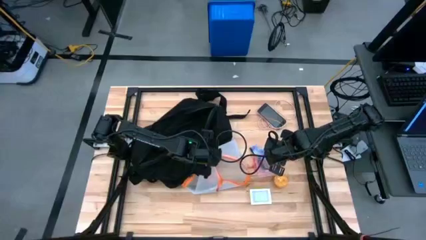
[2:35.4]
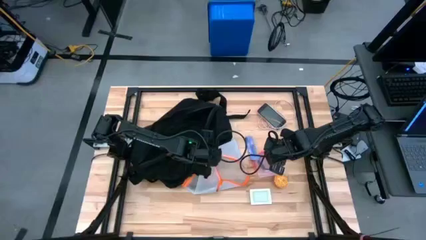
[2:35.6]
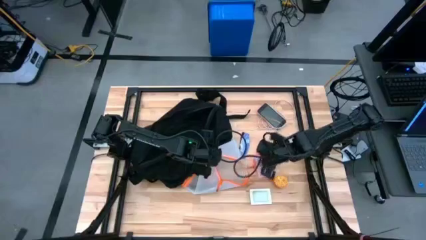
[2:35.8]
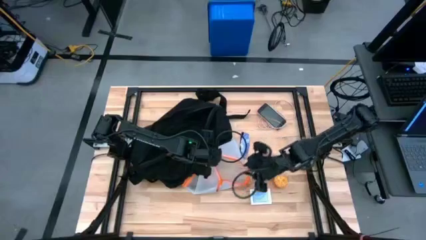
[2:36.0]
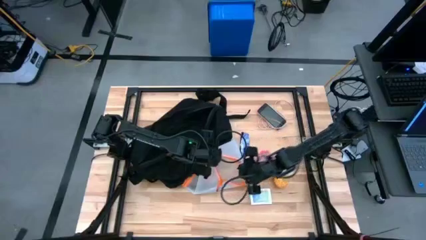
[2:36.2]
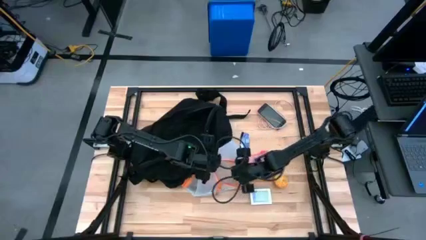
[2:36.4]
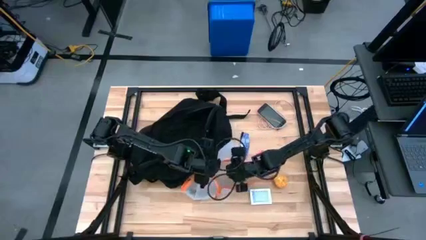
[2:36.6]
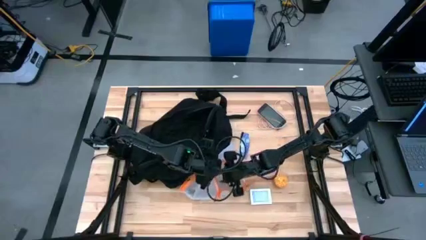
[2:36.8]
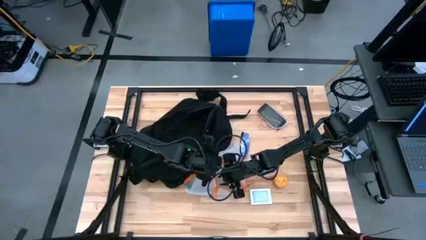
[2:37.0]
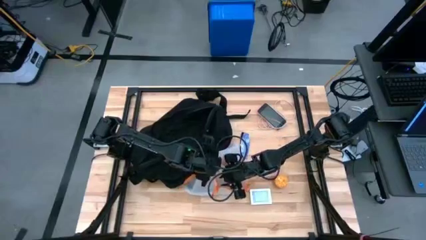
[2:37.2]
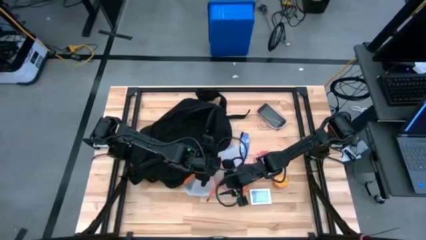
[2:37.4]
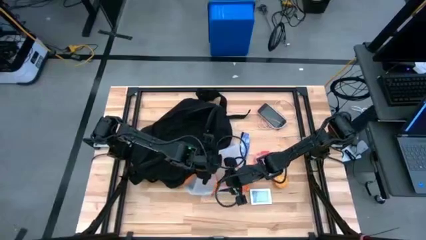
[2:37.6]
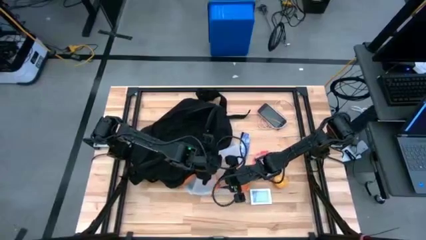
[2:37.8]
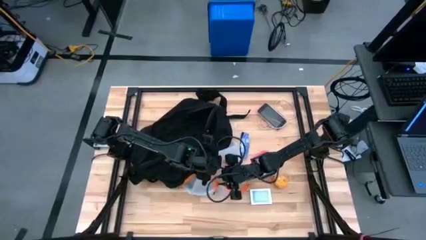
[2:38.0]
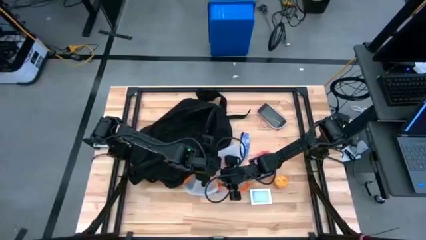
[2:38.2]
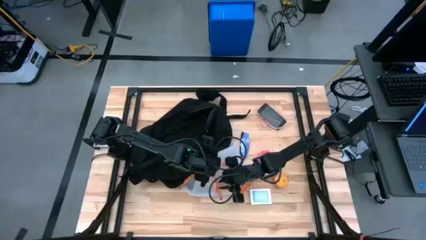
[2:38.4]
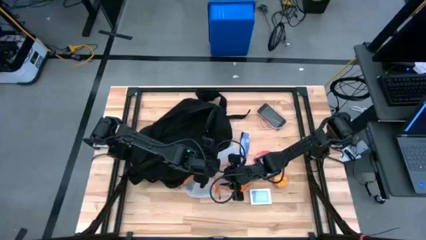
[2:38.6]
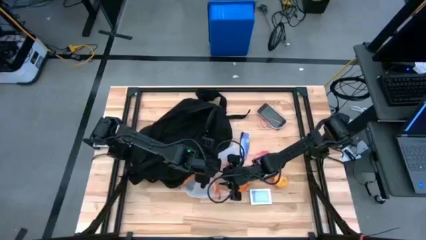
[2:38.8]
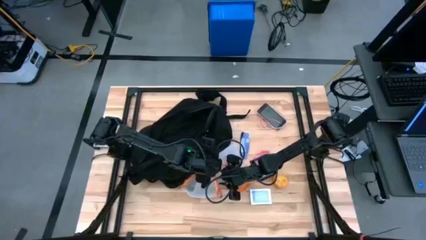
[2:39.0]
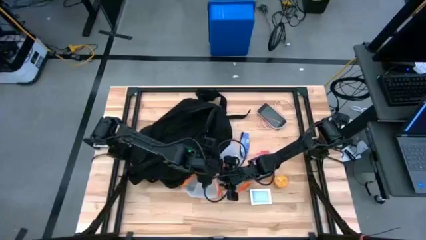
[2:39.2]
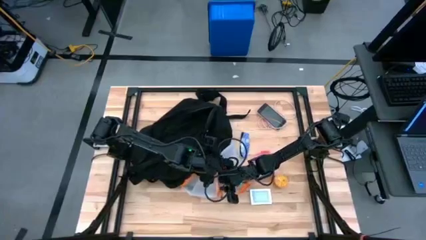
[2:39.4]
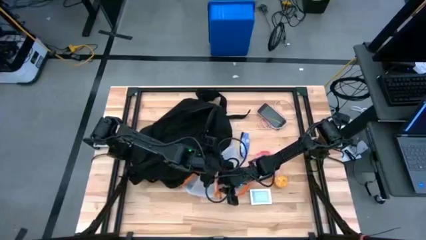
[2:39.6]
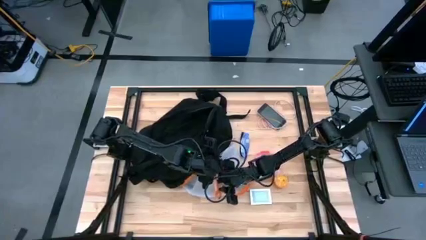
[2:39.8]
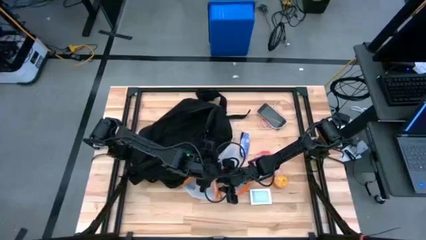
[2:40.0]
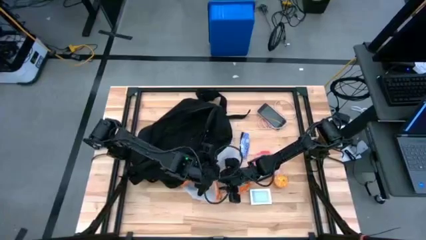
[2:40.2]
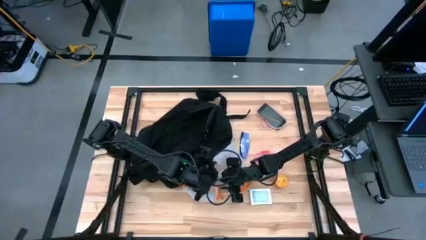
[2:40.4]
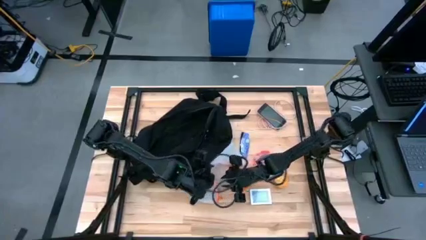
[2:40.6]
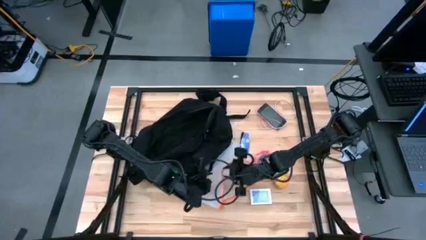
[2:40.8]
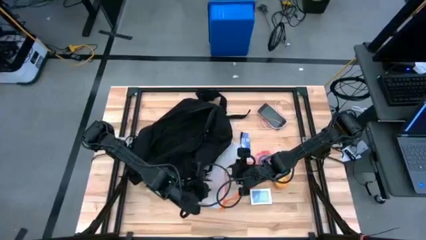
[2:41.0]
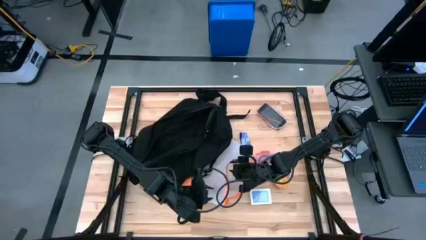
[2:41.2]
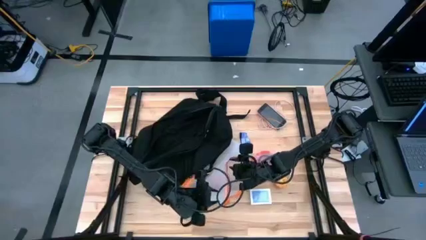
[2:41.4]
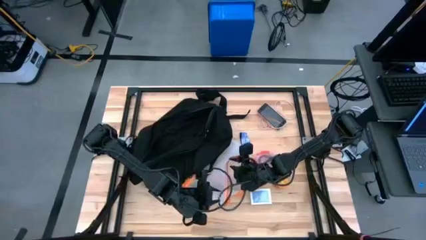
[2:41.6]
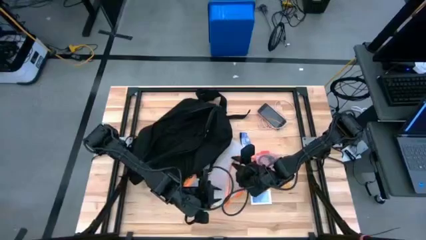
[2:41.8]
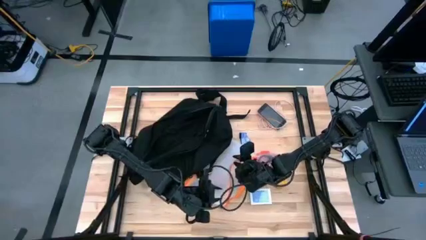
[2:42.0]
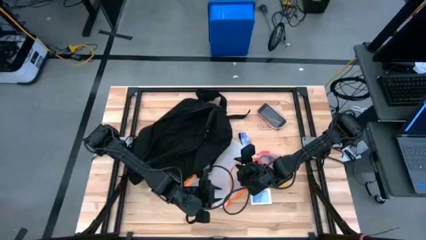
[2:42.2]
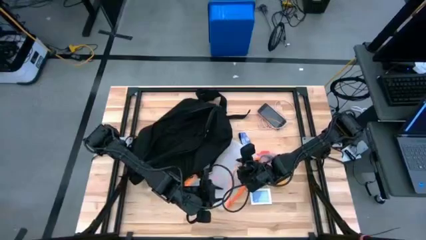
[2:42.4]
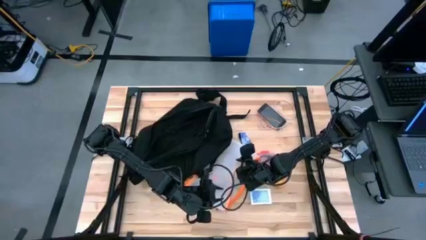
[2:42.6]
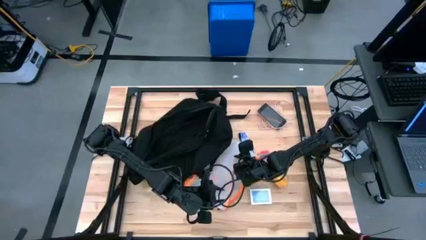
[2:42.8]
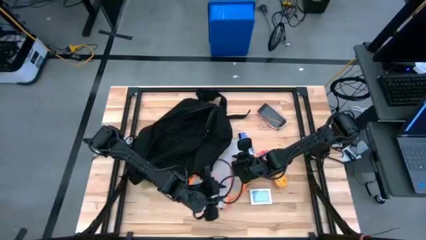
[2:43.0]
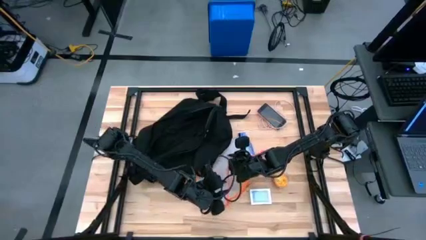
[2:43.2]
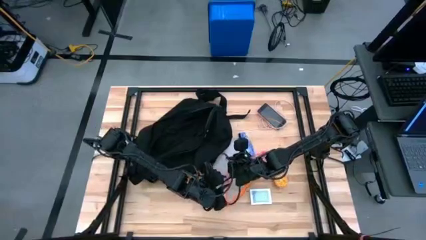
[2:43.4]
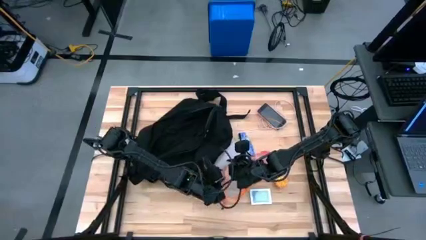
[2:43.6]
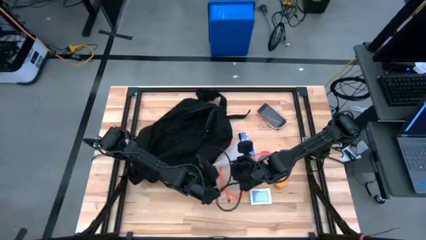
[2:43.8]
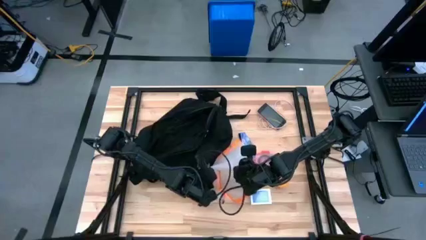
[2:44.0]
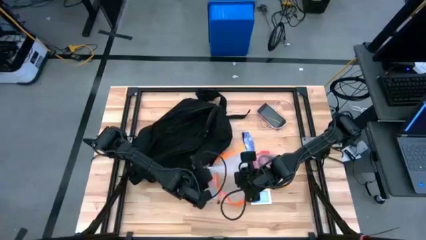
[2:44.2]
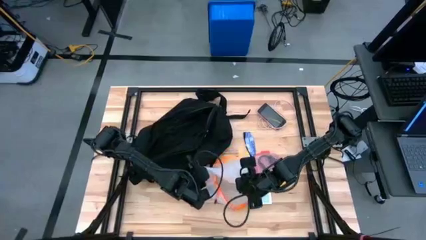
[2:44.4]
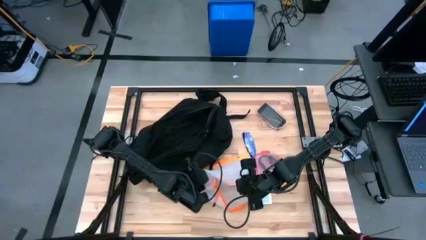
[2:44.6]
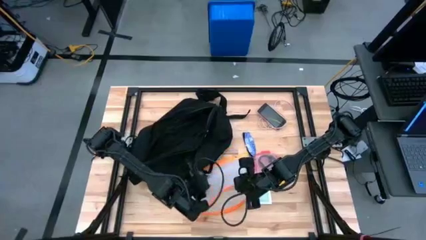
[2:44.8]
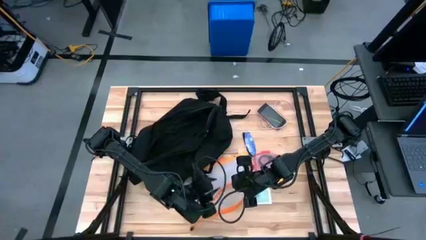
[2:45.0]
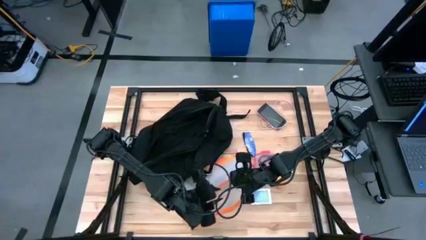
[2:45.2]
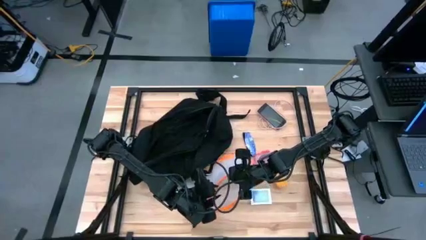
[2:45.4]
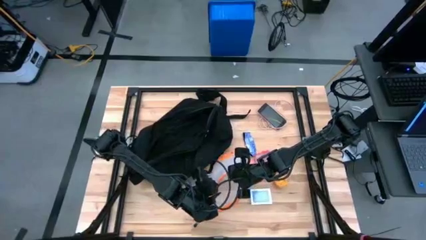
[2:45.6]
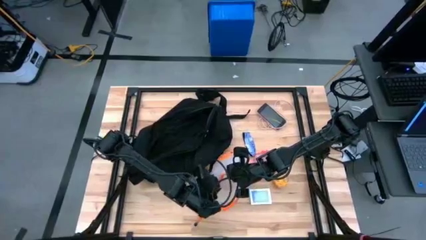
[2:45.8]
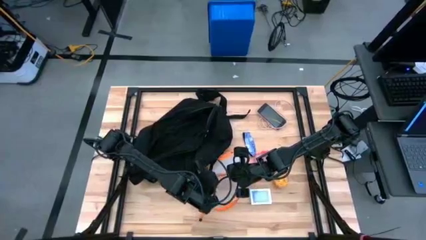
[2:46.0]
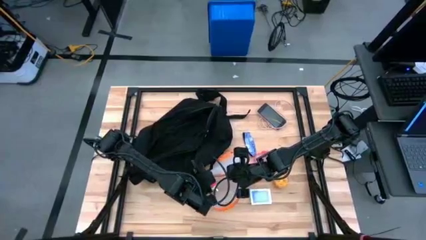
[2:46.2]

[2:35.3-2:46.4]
Task: Unpack backpack
Remove the pink charger adapter from the orange zip bag

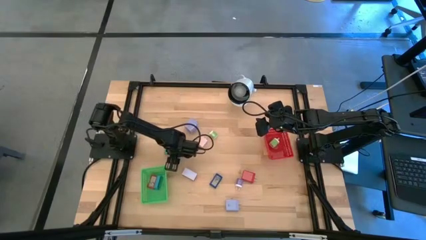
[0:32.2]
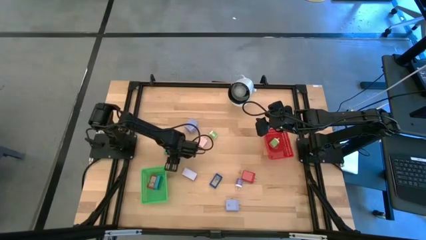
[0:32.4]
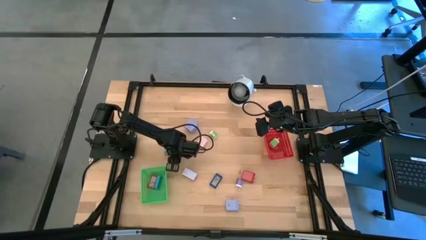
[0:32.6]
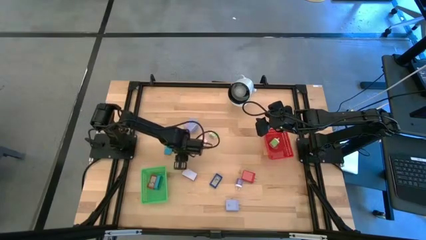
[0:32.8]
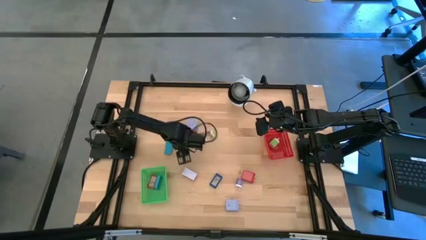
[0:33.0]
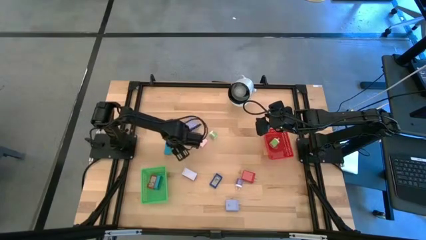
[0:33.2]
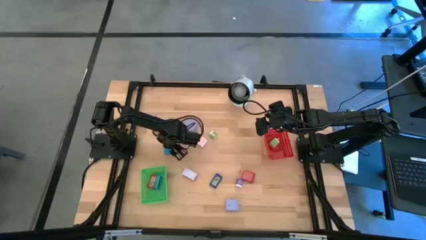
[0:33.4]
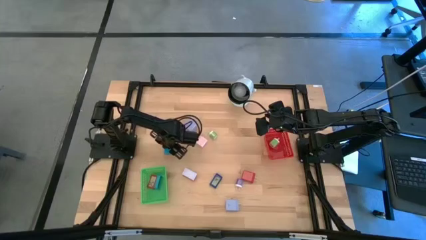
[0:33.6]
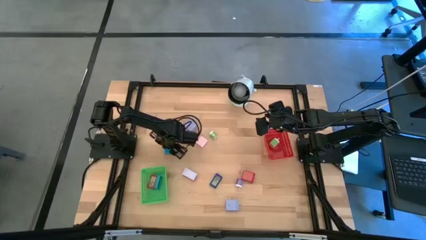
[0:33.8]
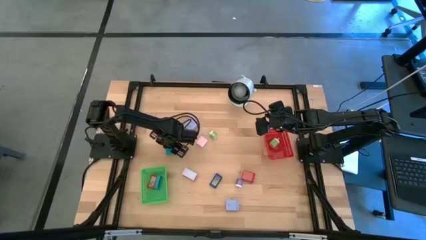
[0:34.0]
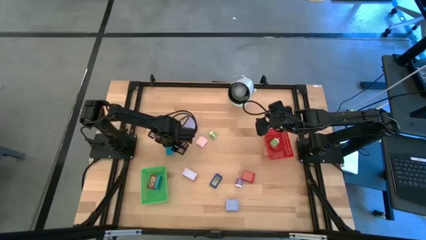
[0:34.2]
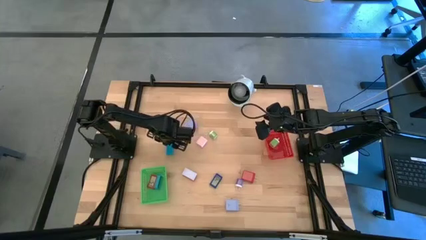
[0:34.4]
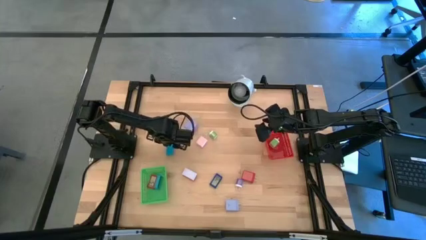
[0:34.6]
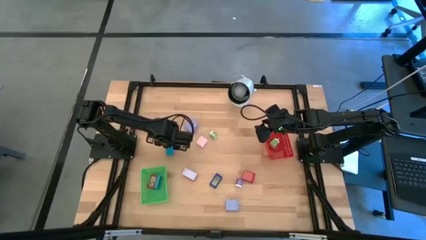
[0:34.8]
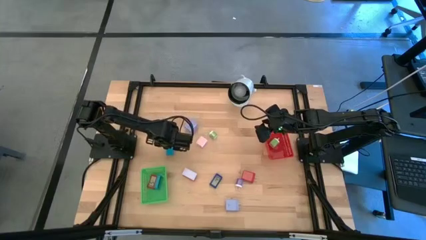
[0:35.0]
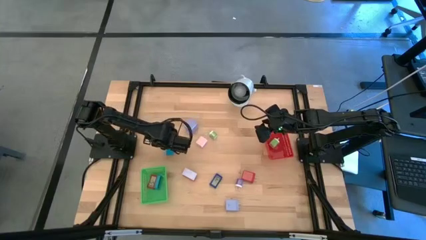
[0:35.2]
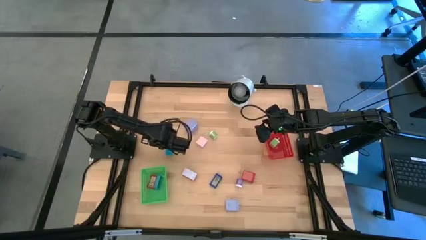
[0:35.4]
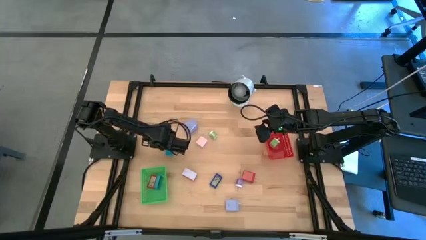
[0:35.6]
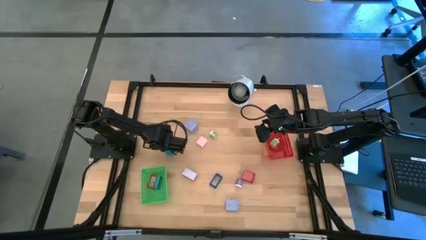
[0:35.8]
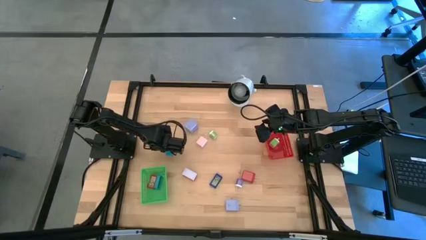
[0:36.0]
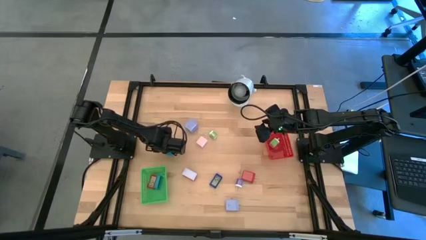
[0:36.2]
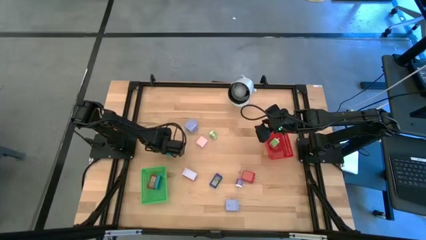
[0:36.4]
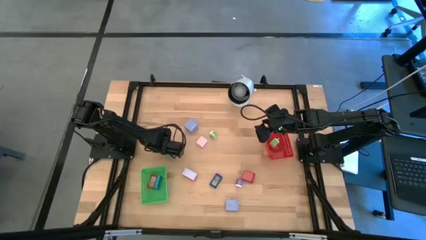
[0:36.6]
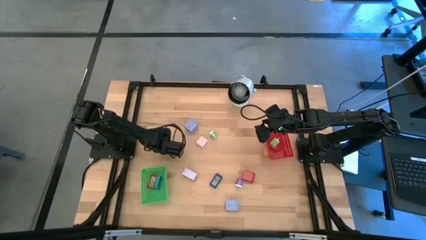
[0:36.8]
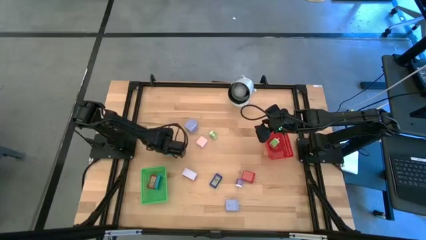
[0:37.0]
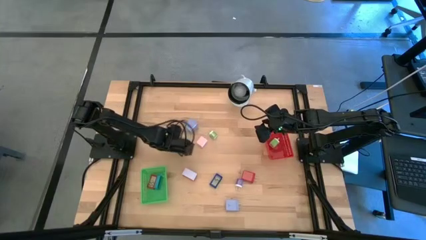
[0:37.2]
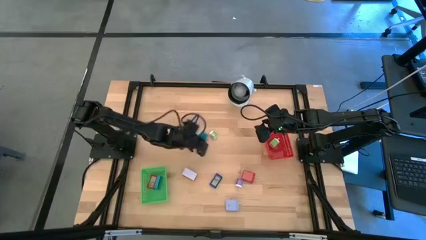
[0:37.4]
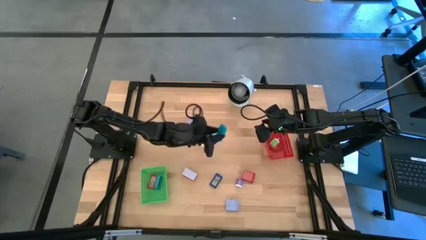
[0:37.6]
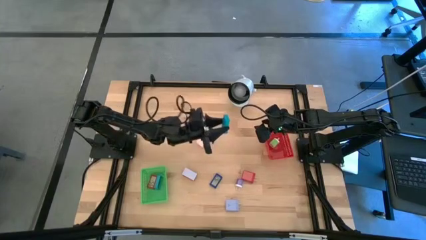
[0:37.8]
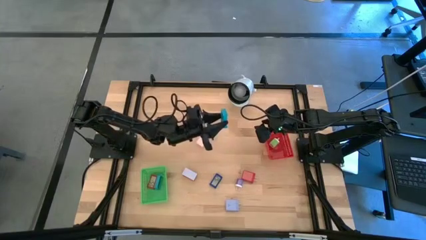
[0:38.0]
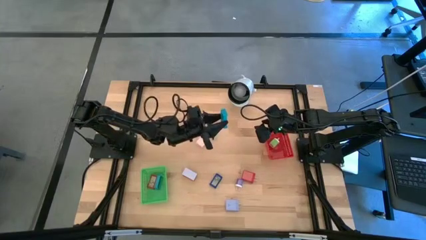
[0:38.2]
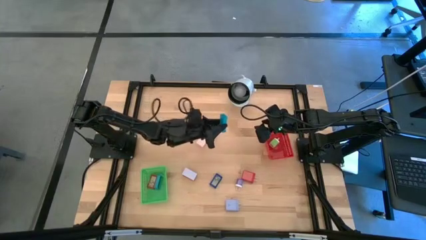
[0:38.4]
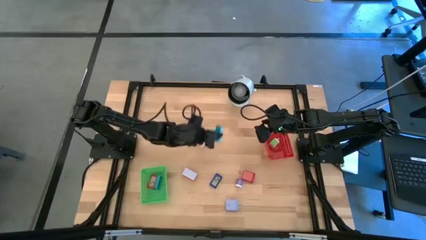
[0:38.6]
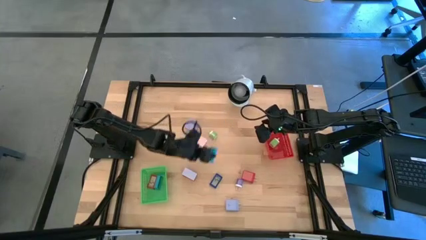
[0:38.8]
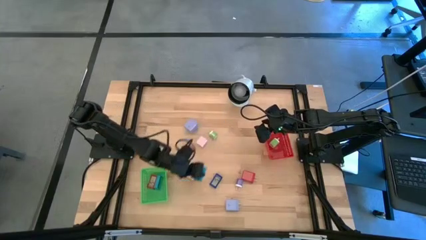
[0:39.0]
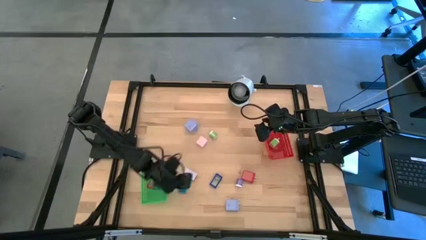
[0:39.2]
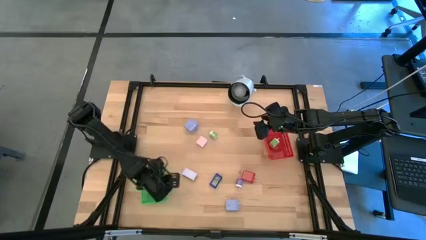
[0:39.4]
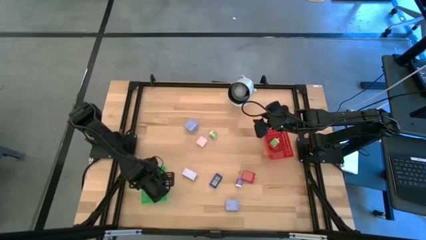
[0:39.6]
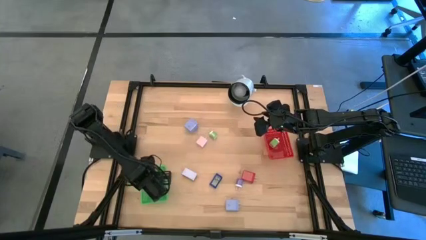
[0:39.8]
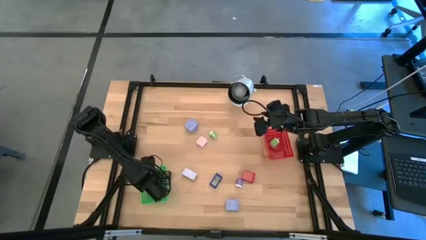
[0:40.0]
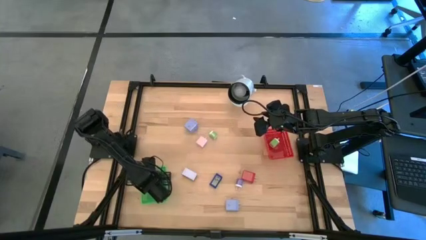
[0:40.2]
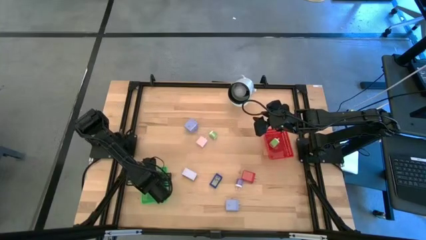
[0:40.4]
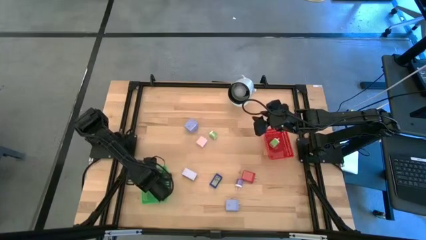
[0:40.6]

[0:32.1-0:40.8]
Task: Pick & Place Office items
Put the light blue digital clock into the green bin
